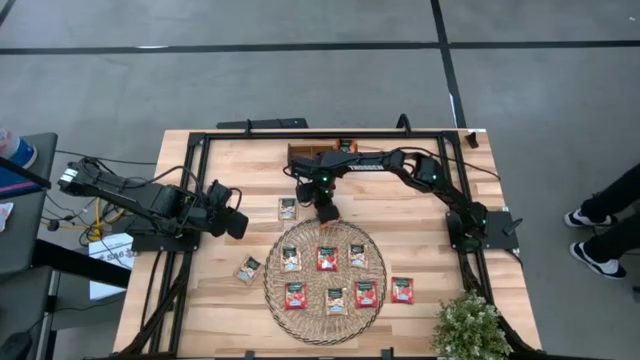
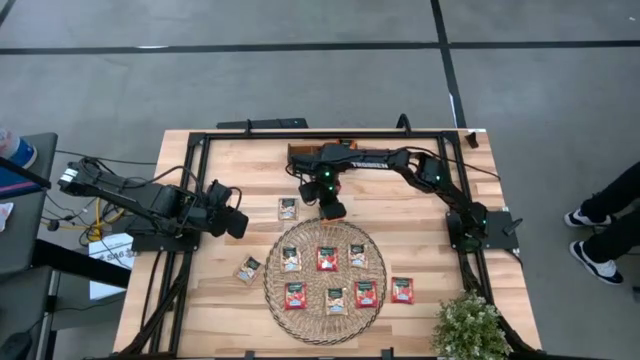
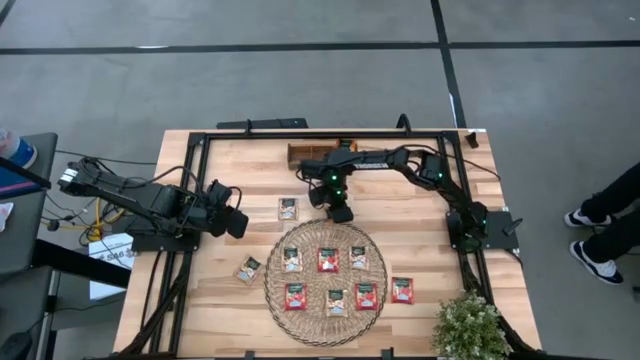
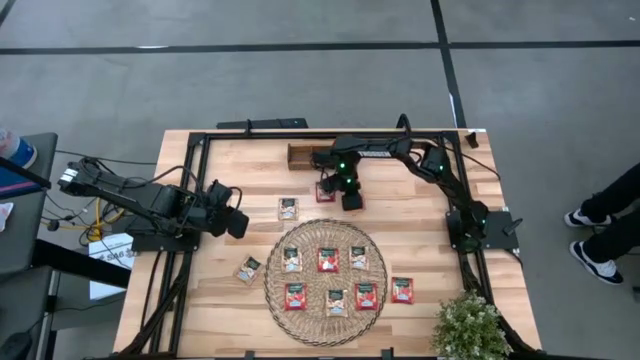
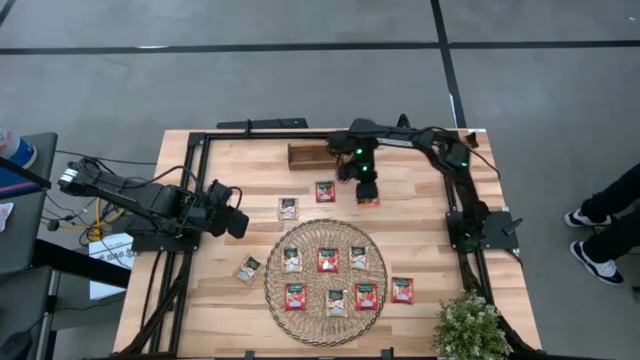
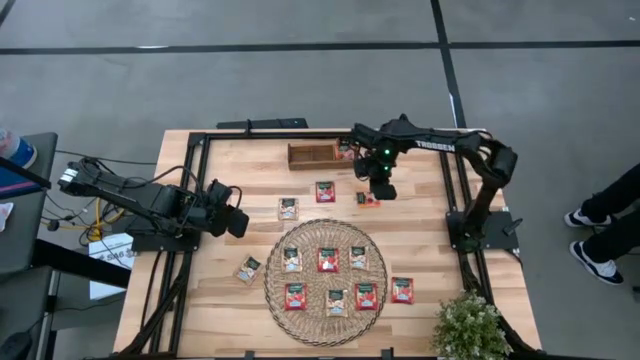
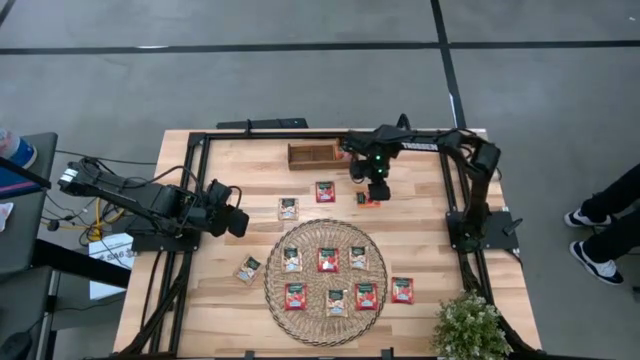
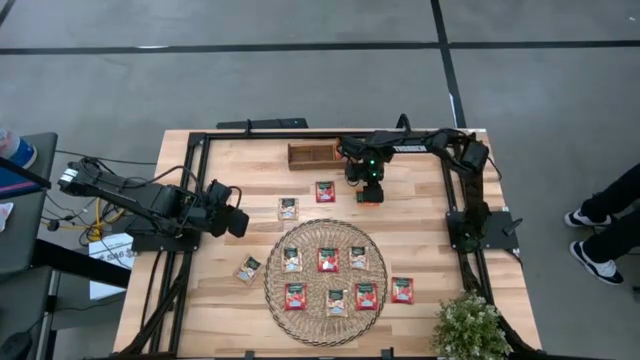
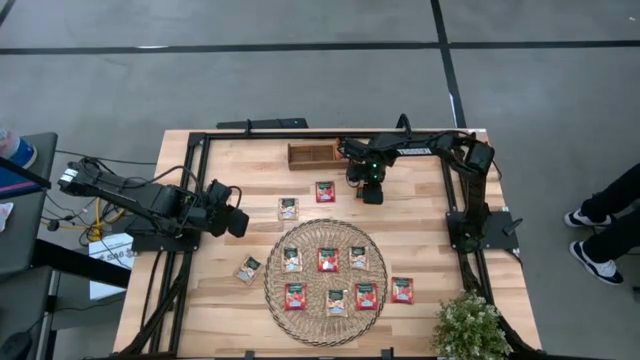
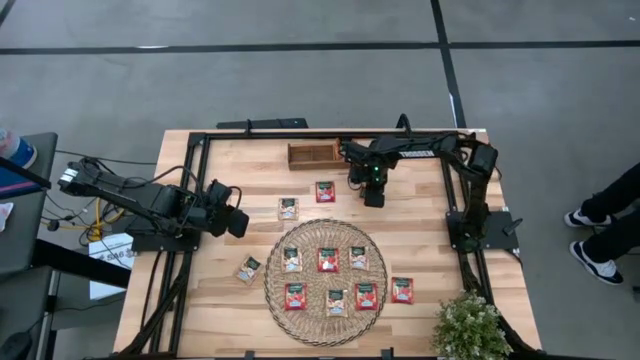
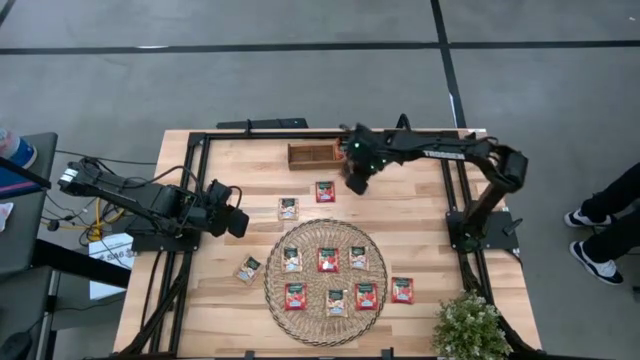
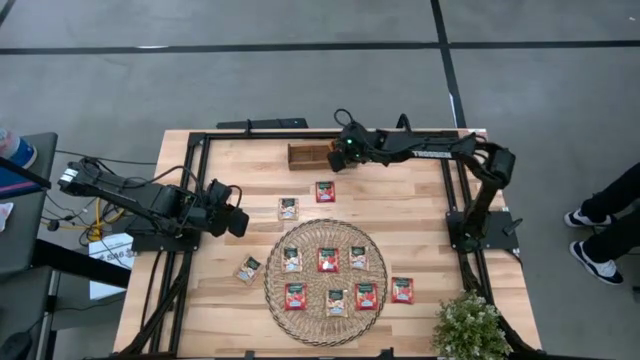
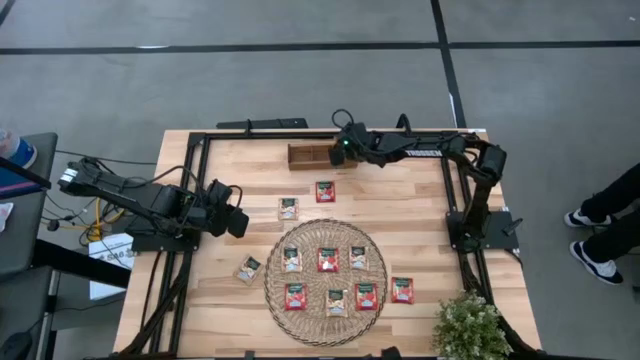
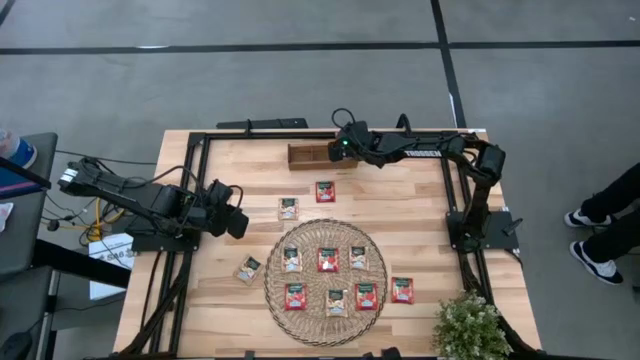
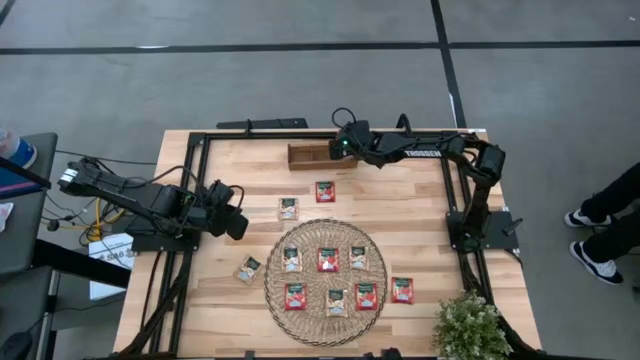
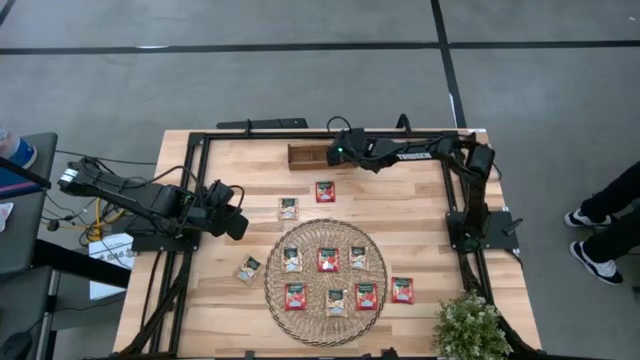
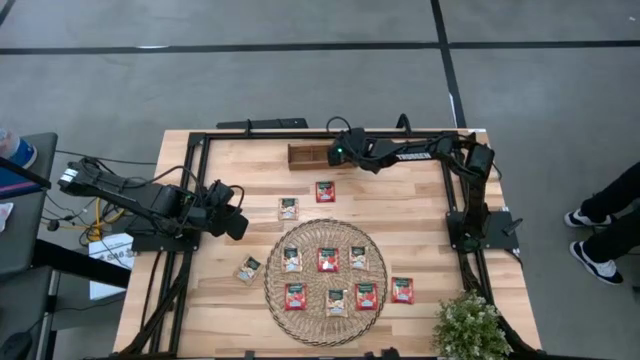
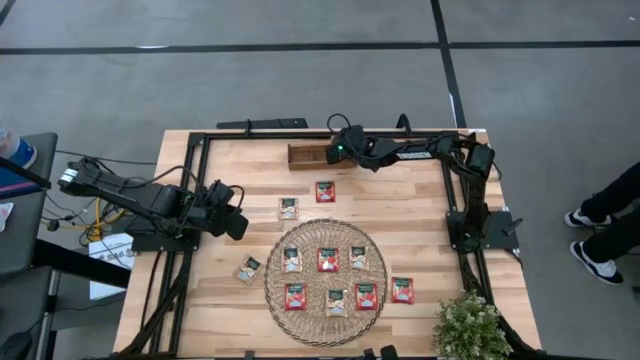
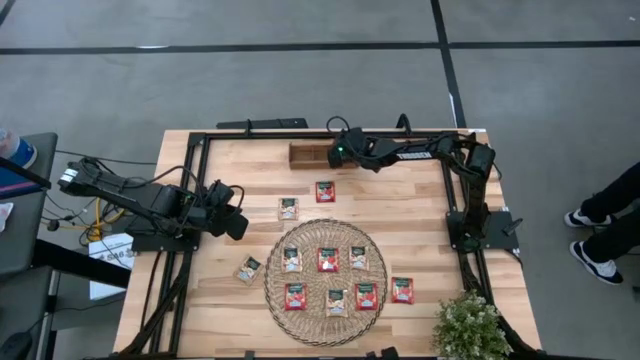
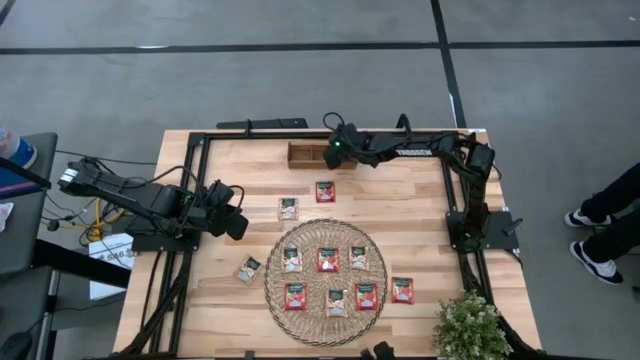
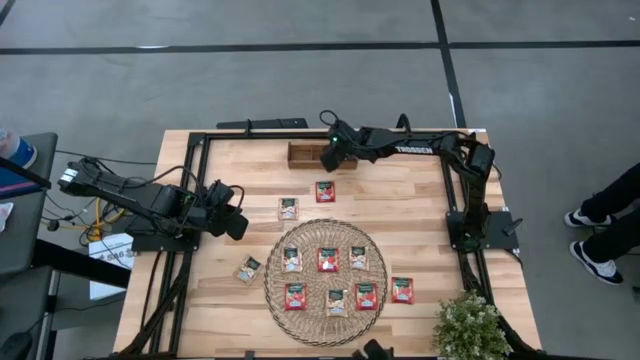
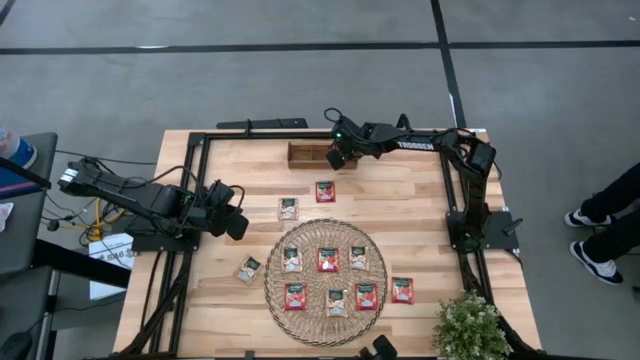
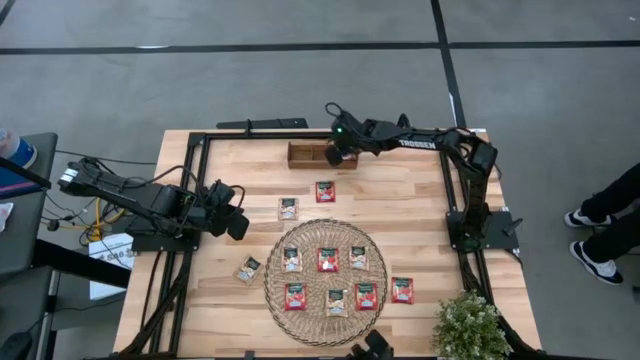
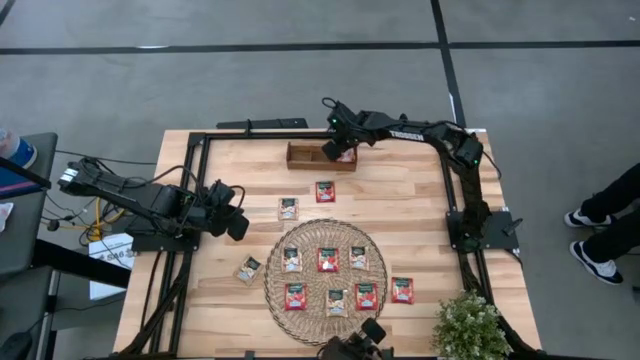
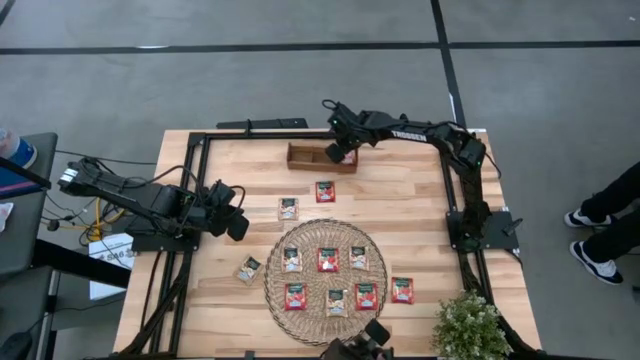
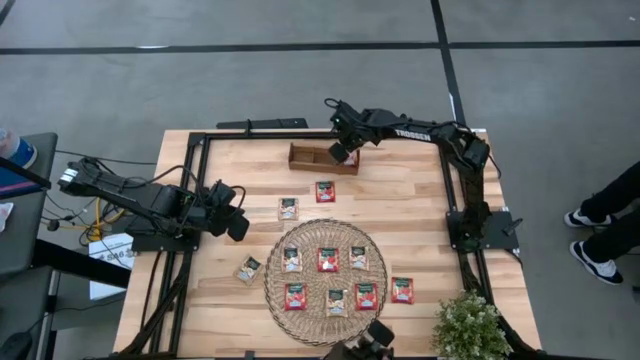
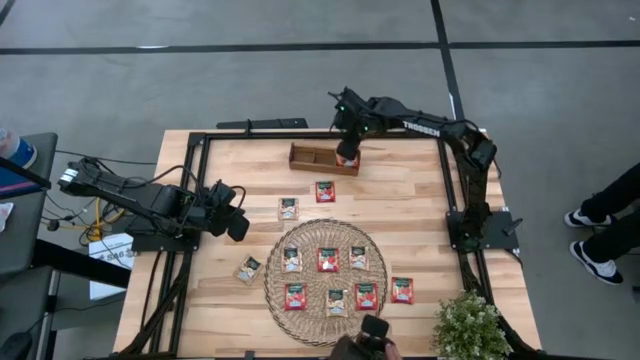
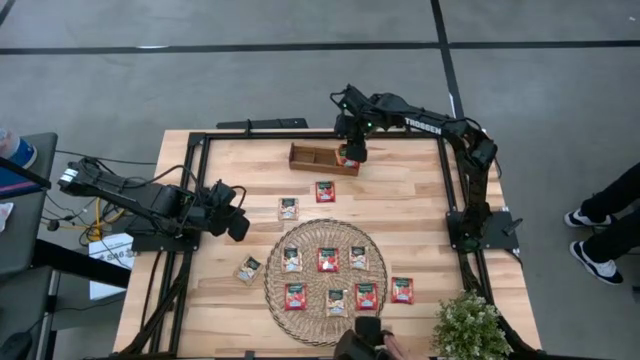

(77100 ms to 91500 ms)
Task: Pick & Place Tea
Put the orange tea bag into the right section of the wooden organizer

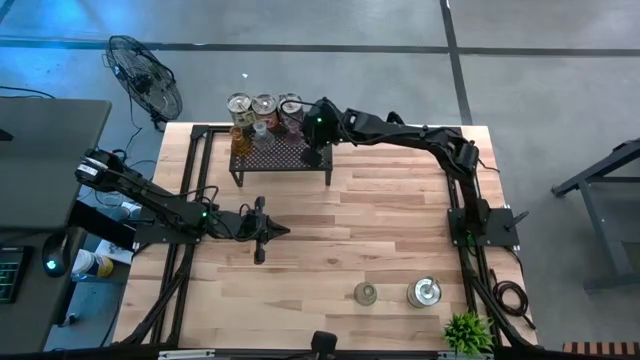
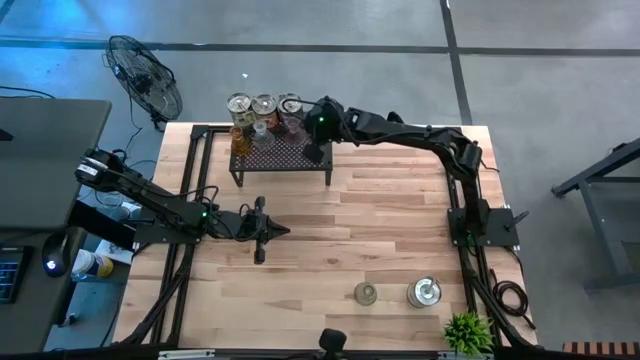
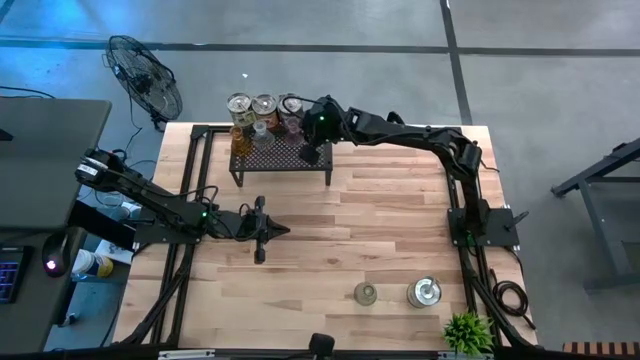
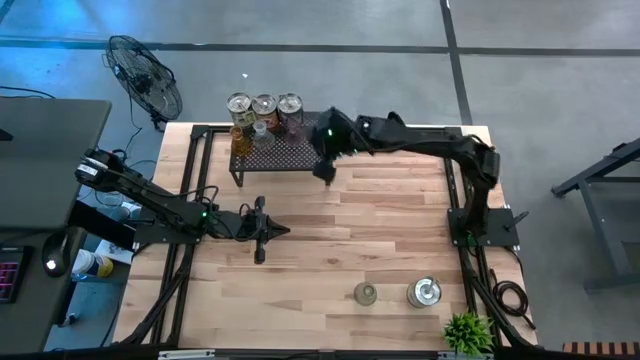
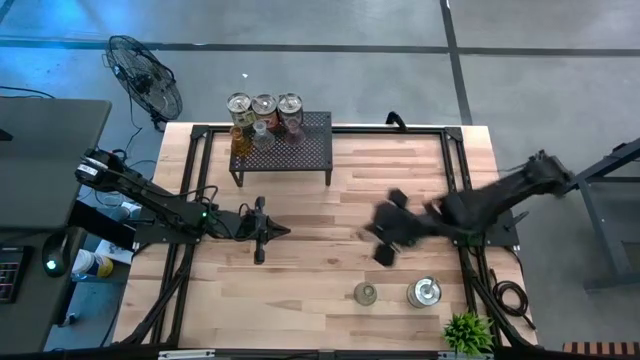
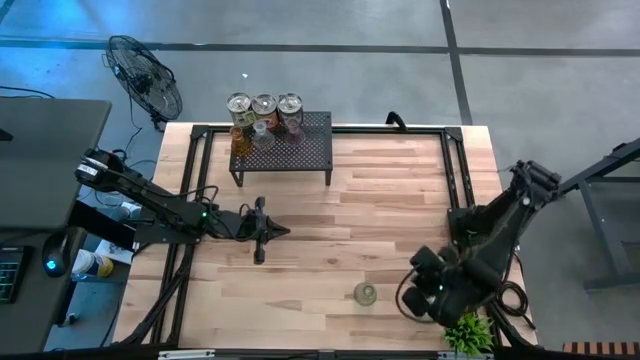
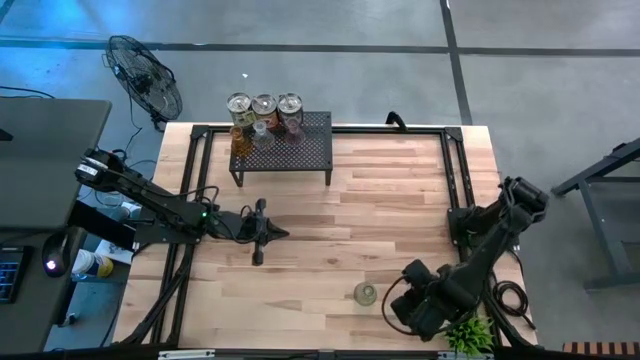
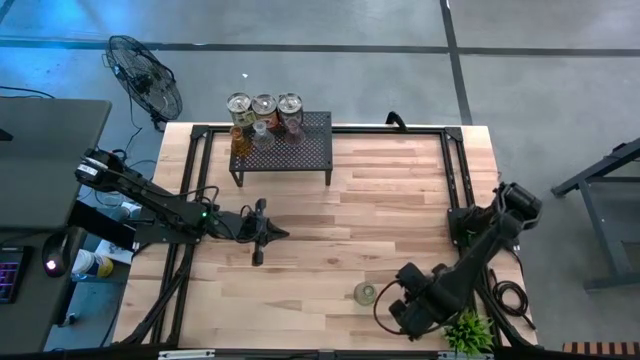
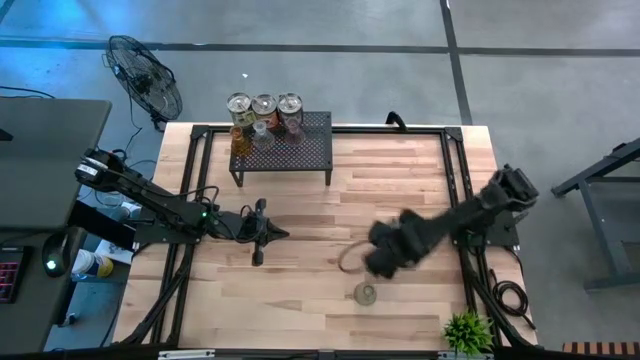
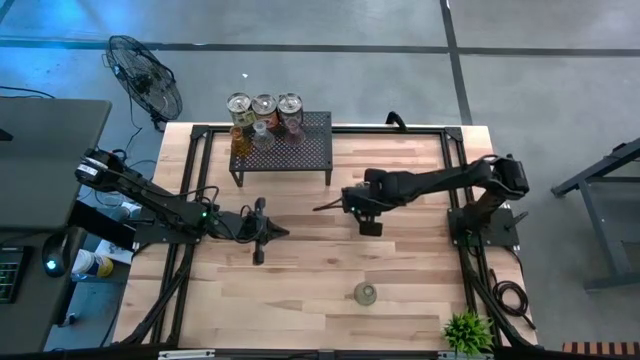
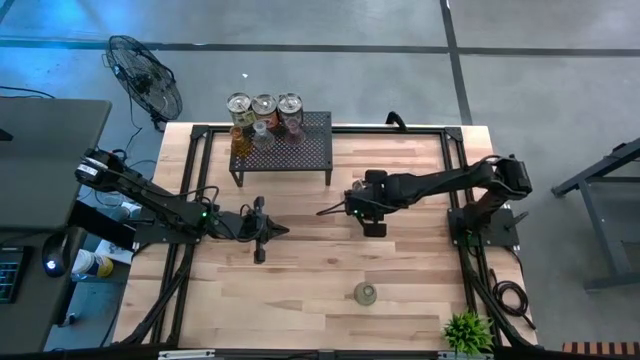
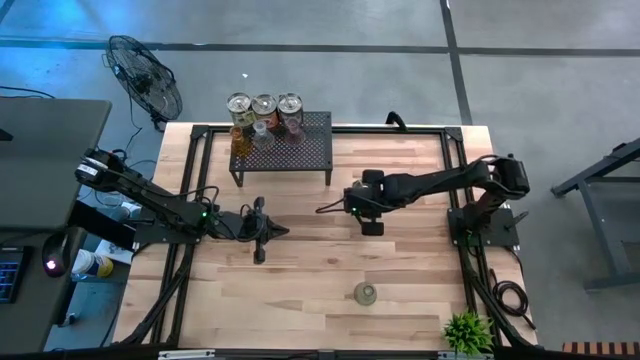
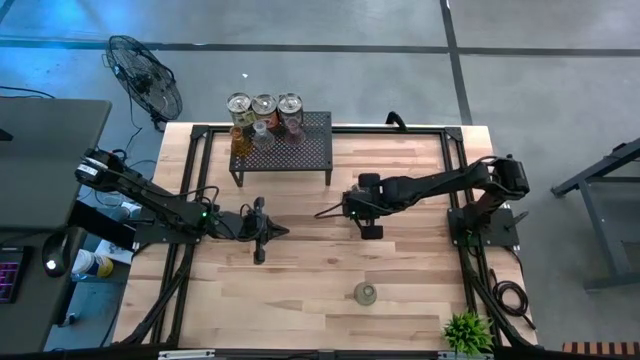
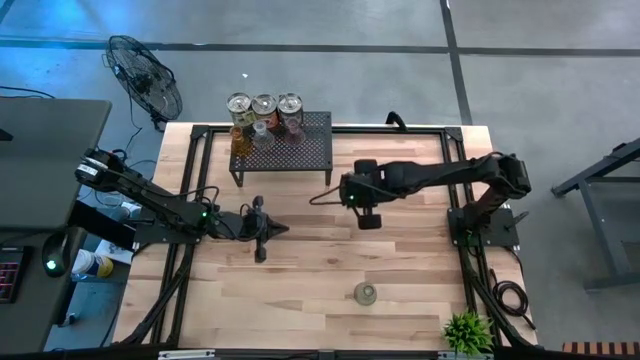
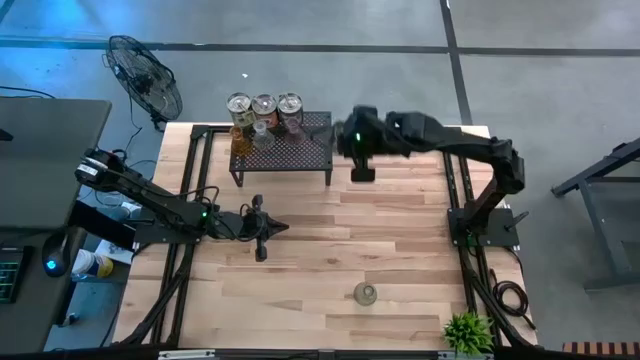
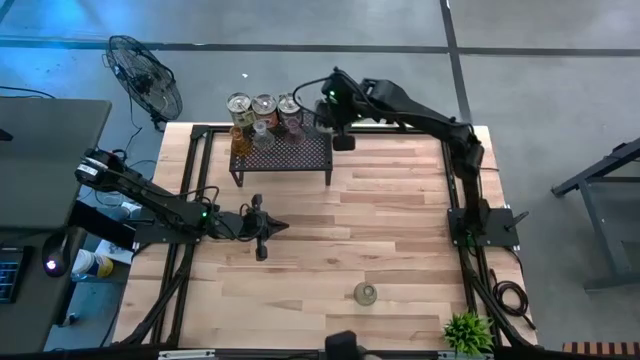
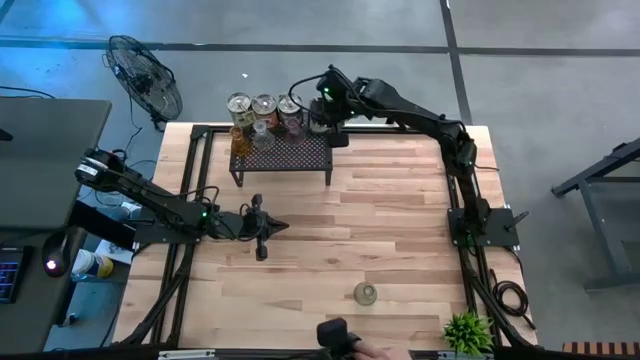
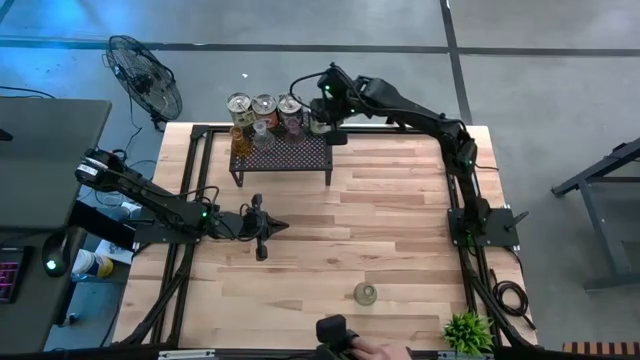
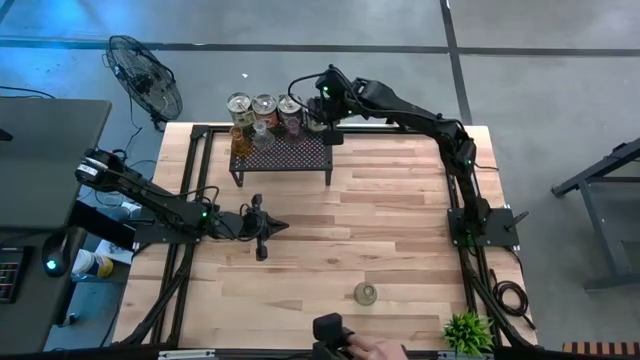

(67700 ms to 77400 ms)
Task: Pick & Place candle stick holders
Put the green scented candle on the shelf
